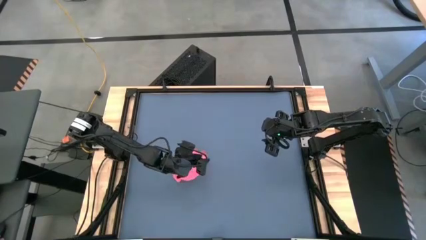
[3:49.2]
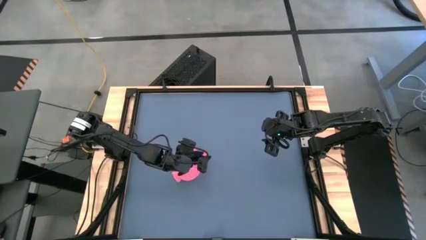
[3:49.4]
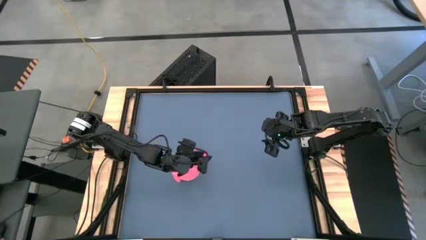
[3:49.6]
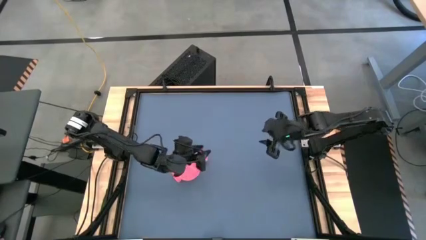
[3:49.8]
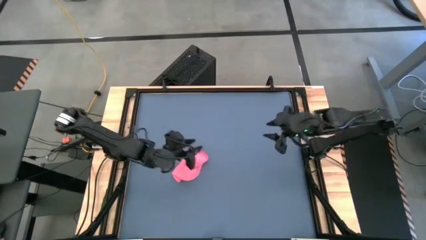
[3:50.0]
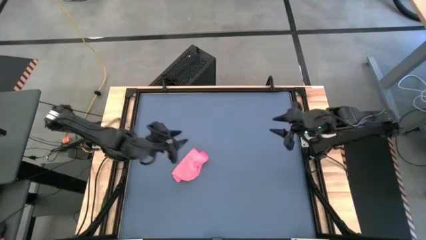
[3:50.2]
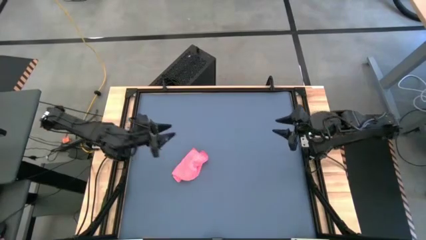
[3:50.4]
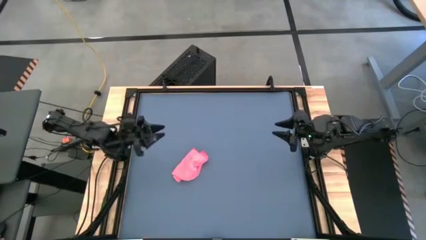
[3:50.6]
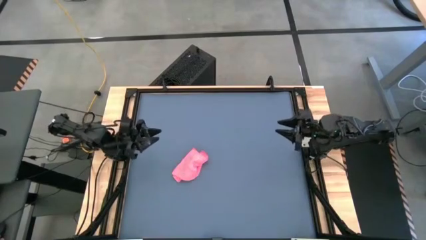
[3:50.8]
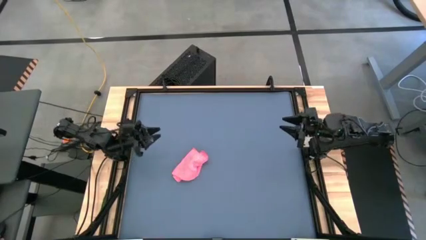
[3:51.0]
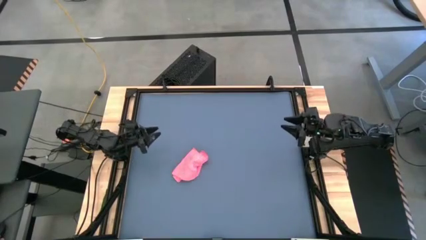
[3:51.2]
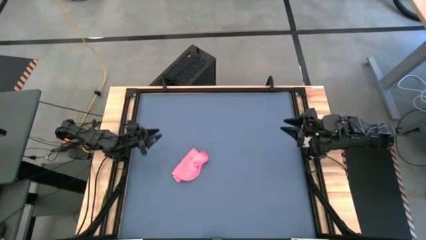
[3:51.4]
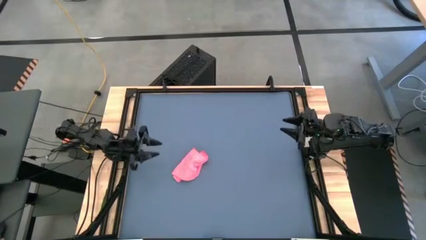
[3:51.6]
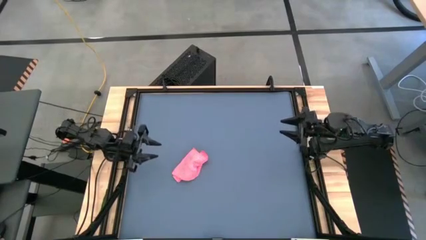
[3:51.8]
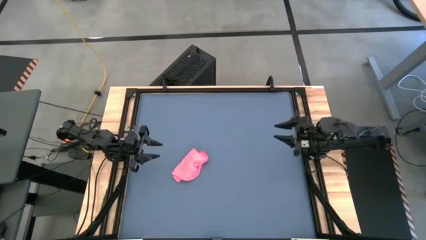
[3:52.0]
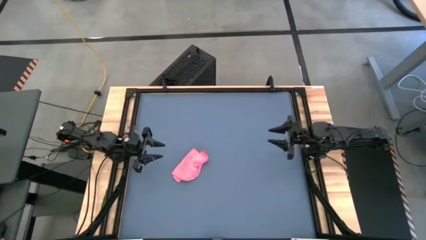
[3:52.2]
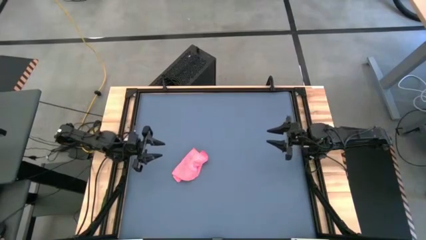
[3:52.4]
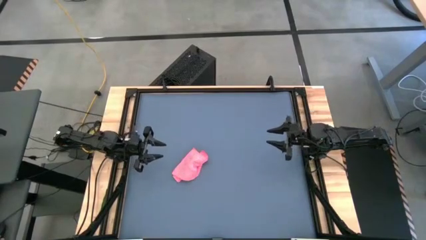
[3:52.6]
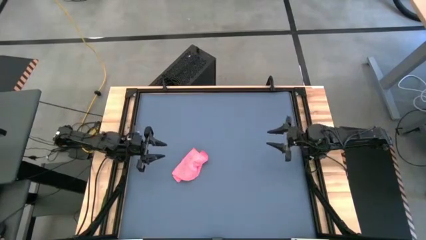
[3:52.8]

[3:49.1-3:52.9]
Task: Roll towel
Return to Home Position

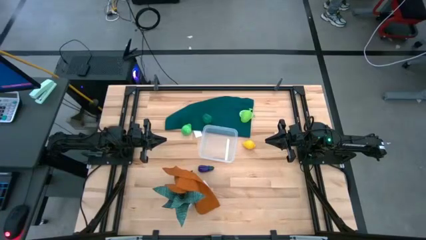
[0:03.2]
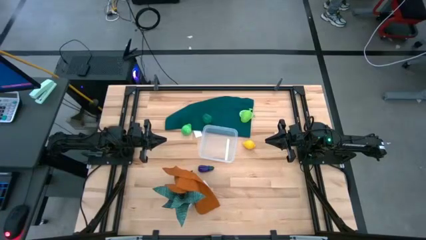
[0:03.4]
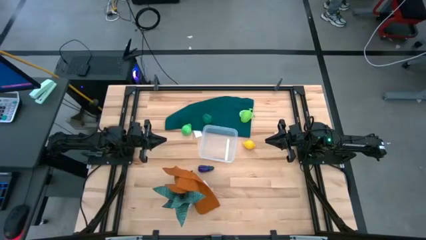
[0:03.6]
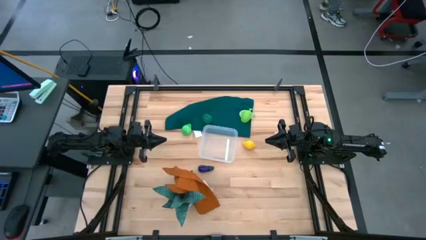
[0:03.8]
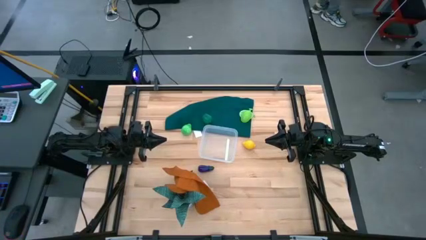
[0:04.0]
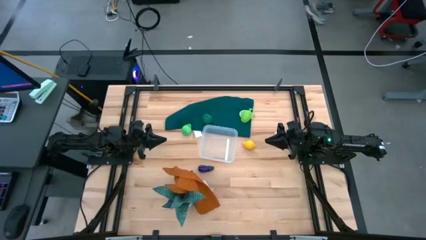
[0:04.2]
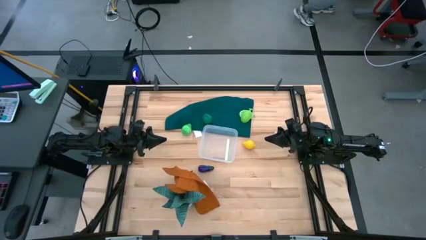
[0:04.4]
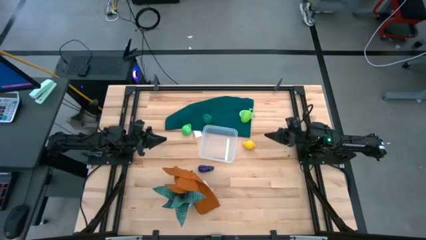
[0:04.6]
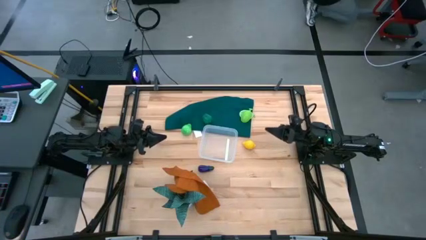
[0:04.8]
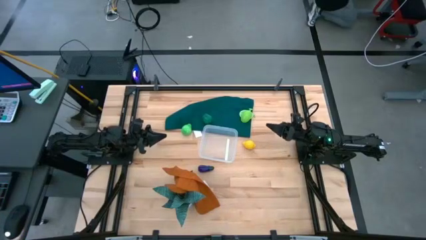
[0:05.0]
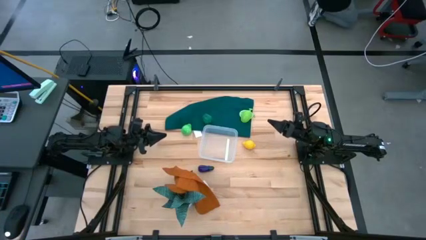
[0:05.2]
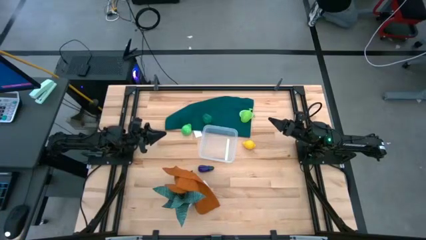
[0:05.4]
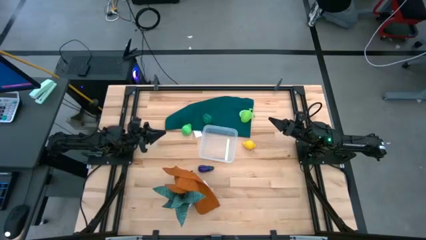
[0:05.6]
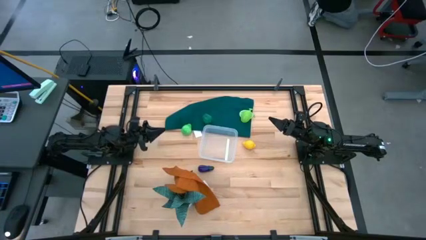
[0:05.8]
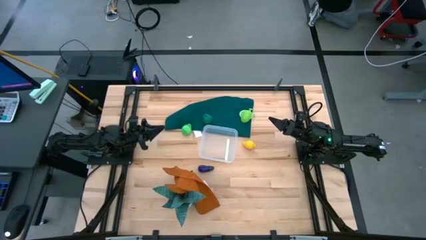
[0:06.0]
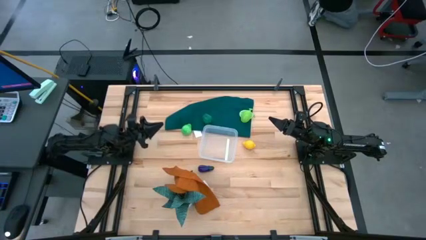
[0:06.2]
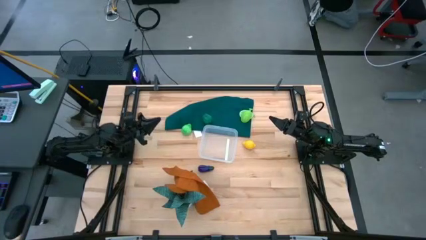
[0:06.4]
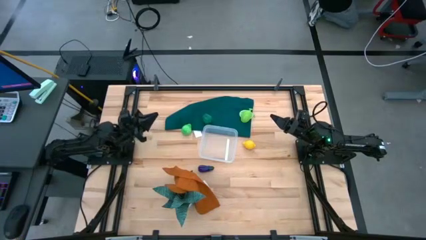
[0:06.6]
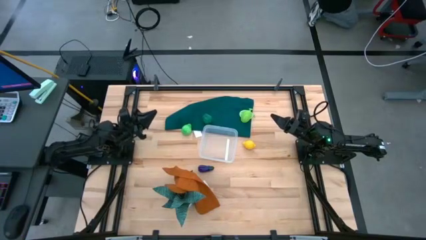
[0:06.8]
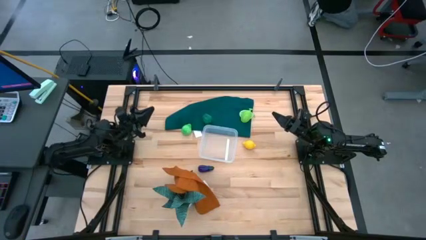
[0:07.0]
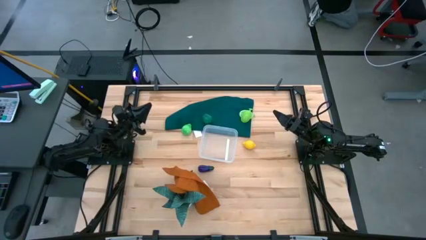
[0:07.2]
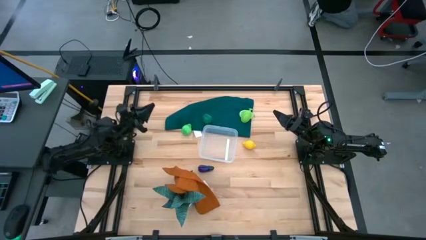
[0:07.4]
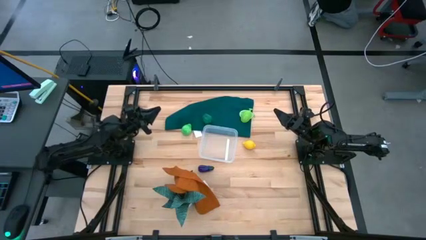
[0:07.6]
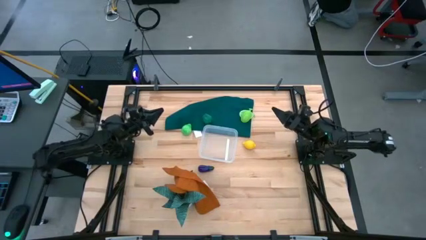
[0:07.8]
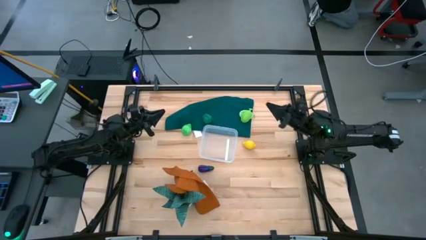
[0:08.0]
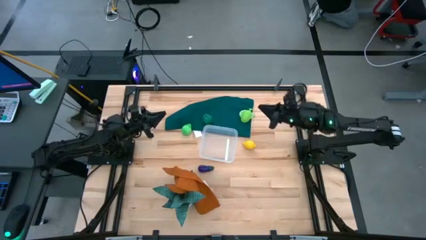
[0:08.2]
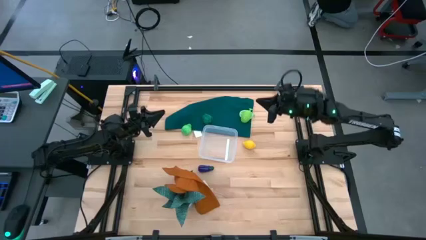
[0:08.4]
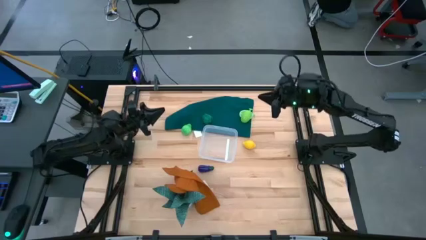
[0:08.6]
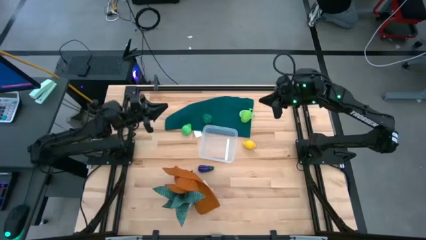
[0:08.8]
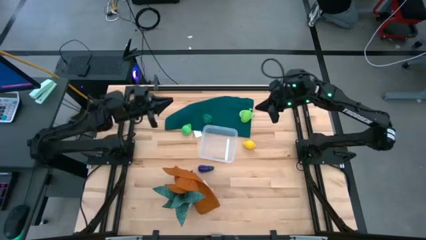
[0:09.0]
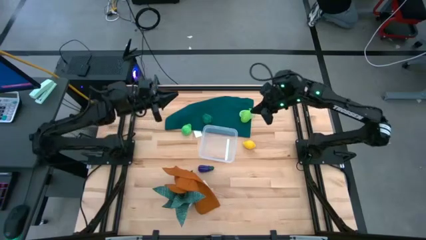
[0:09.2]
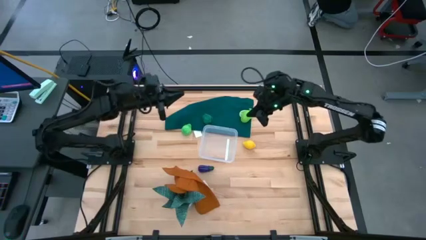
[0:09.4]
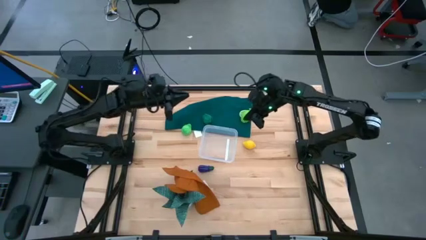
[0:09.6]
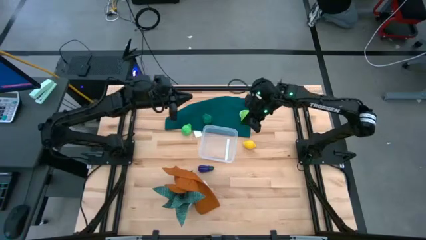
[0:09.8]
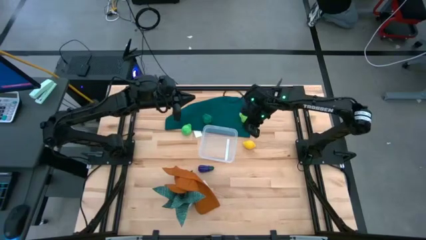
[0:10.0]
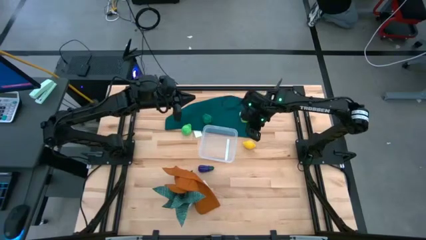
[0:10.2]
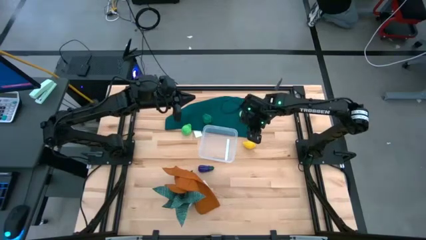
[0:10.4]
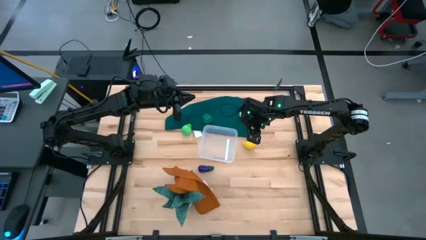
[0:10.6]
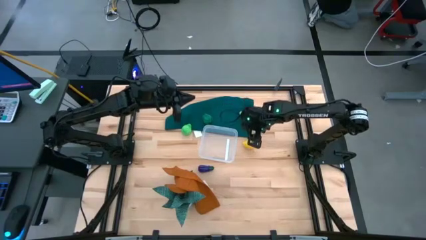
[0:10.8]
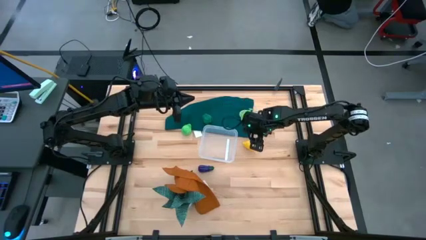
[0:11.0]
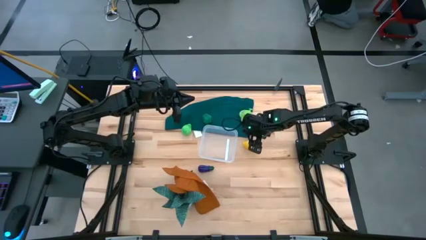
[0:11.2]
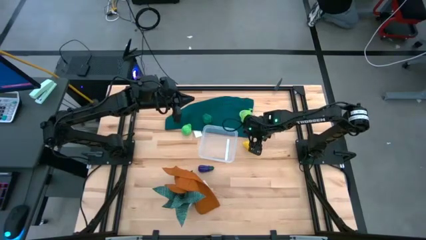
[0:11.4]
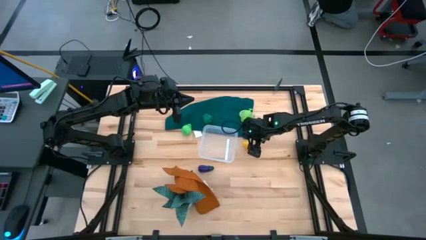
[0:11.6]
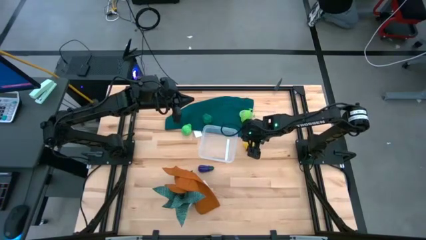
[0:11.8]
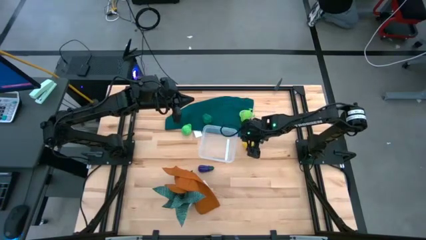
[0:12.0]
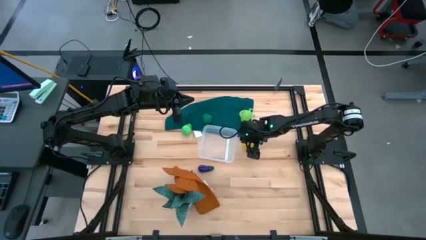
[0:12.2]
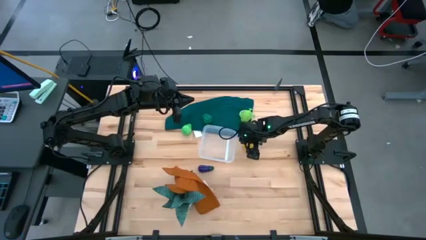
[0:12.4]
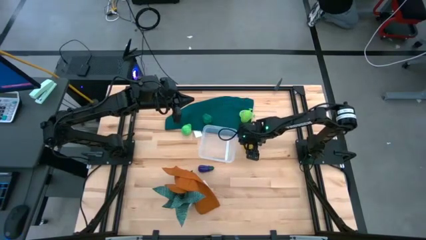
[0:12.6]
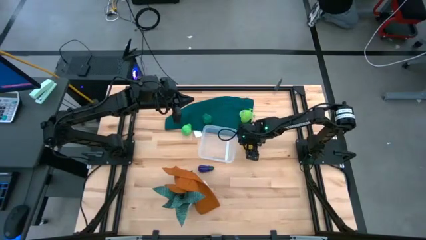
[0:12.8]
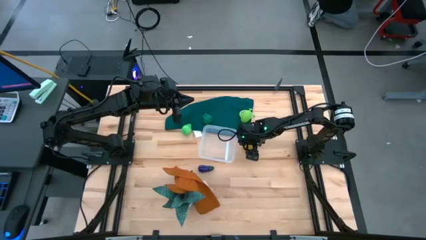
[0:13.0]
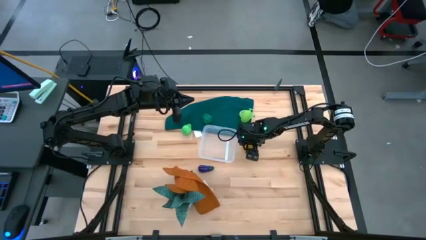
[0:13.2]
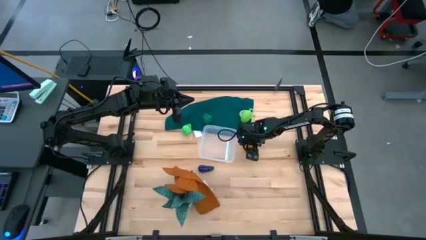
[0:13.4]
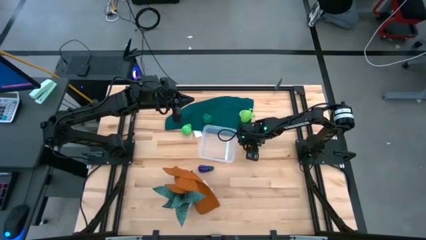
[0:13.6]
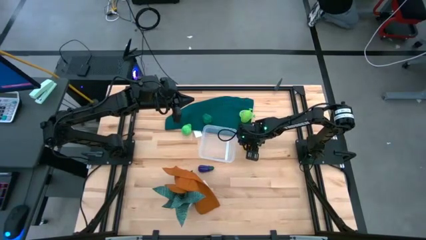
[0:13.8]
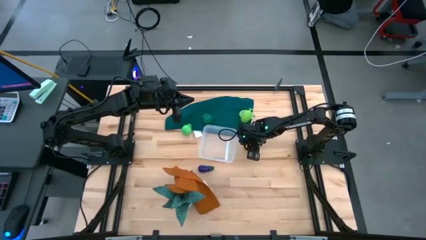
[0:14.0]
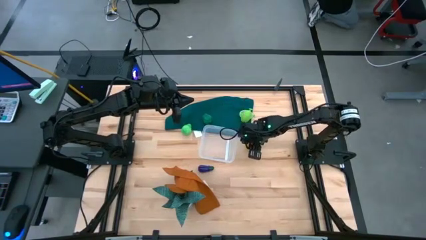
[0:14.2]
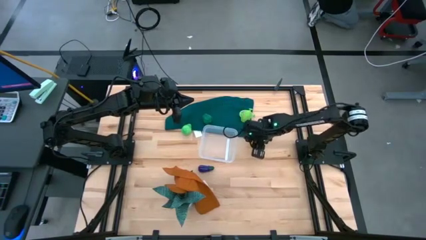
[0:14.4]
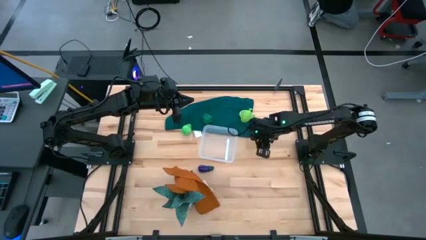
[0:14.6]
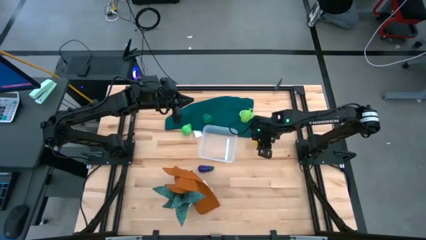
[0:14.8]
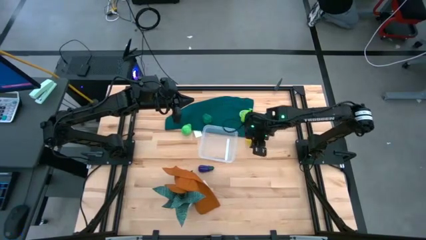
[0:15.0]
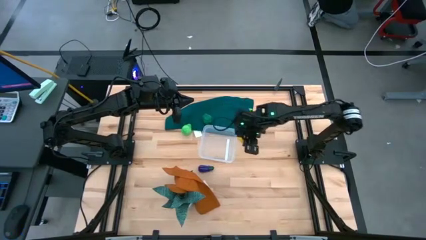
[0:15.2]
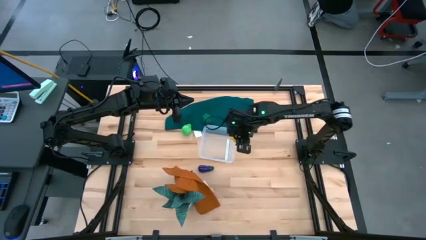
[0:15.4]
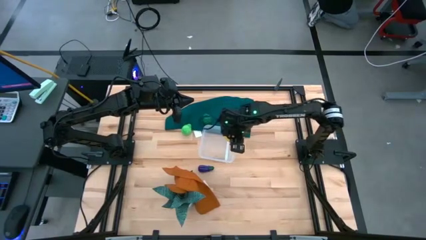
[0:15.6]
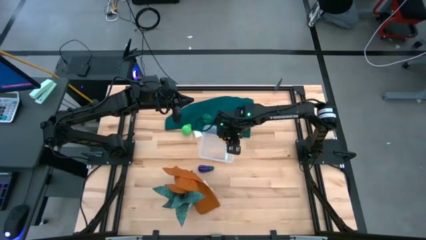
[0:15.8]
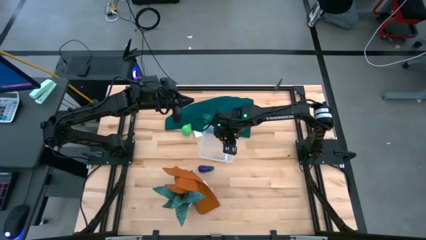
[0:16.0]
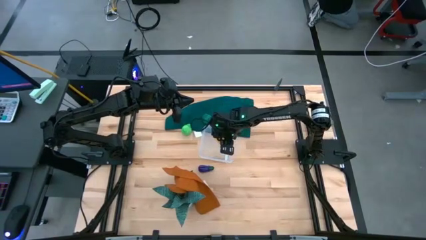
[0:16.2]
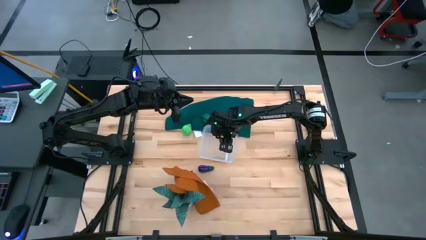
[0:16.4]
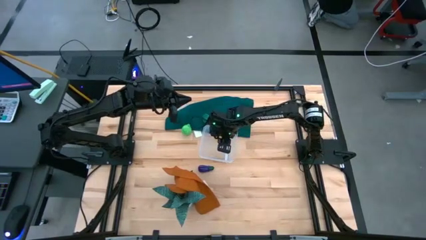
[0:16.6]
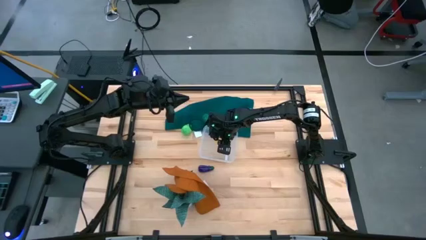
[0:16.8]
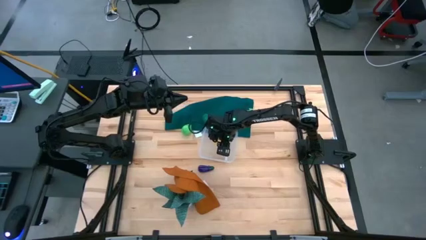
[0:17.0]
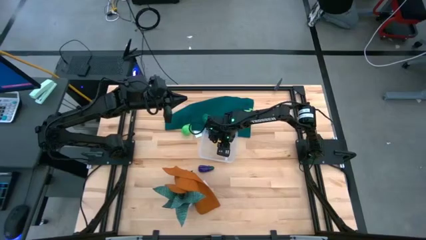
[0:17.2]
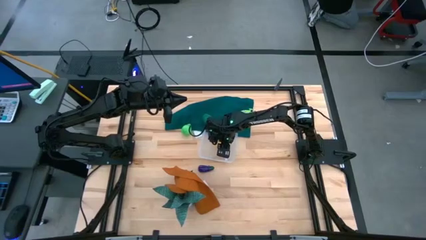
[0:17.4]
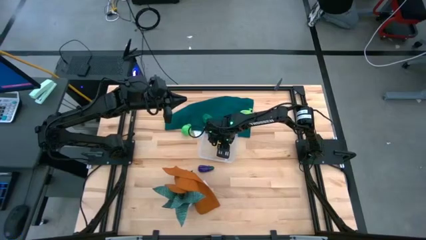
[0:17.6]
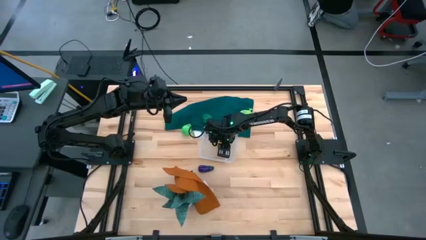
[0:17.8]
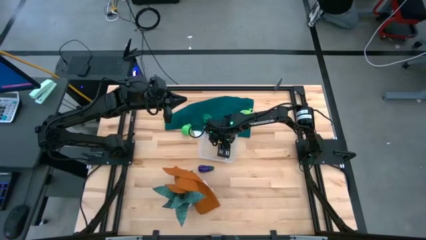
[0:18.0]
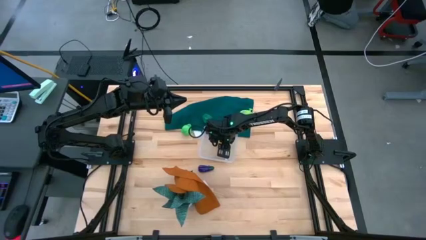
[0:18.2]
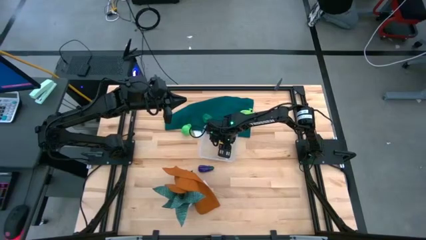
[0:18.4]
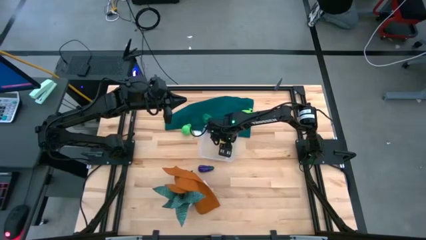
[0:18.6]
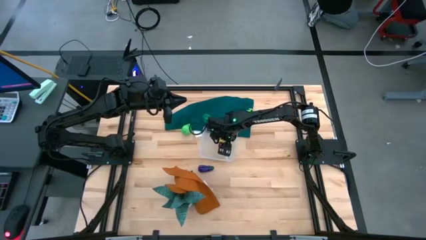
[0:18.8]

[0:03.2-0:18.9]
Task: Pick and placing Produce into tupperware
Put the lemon into the bin
